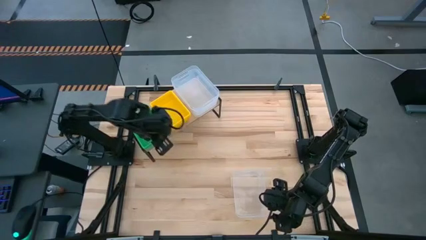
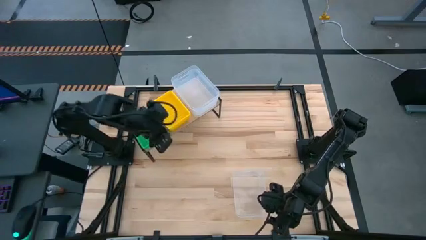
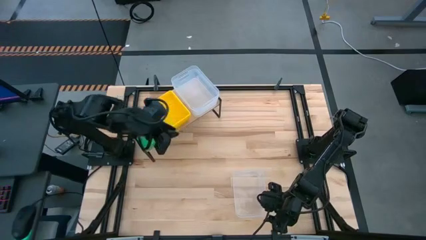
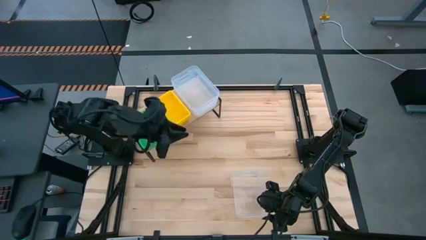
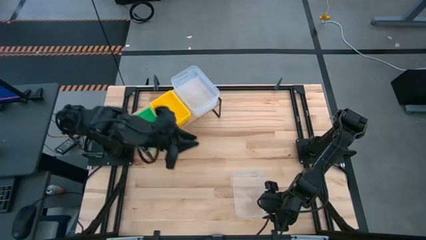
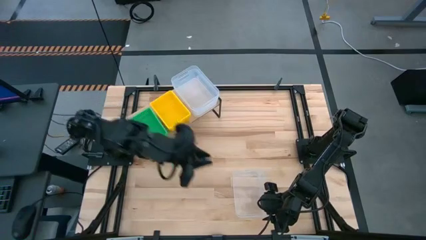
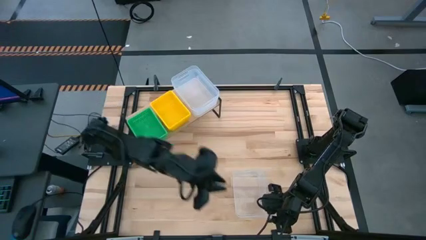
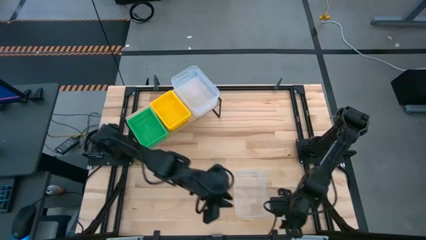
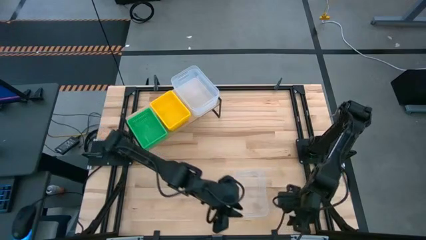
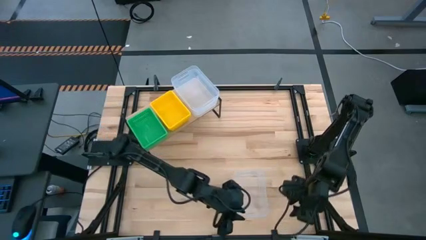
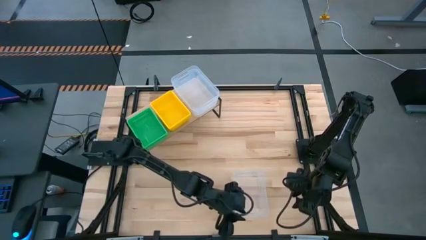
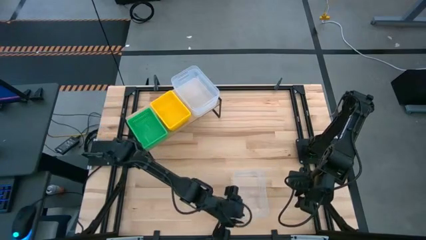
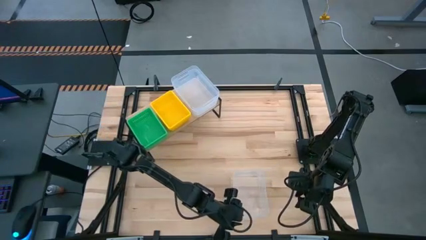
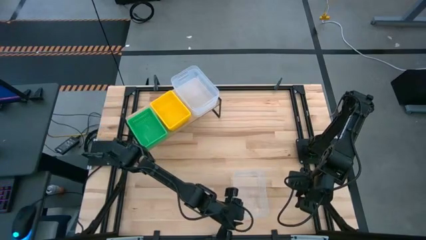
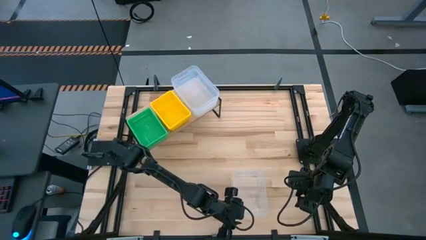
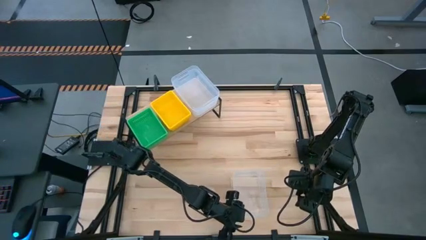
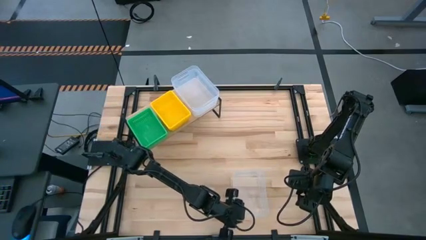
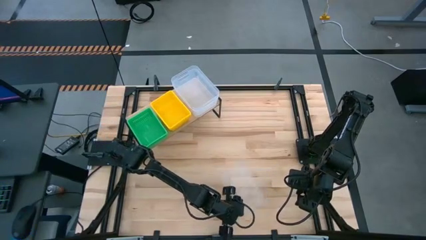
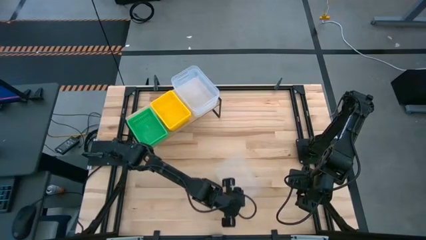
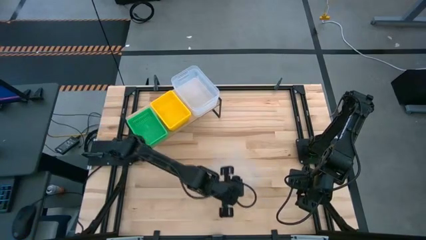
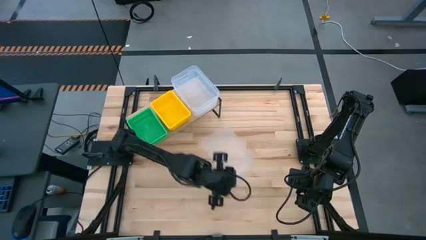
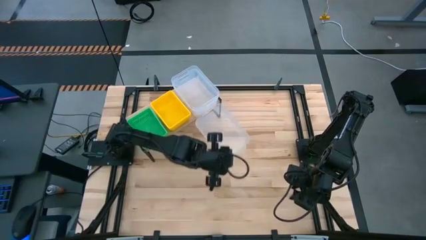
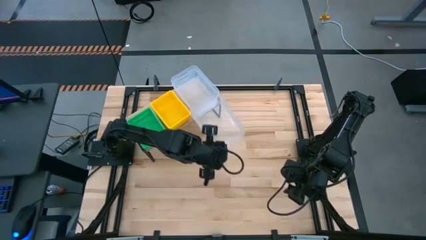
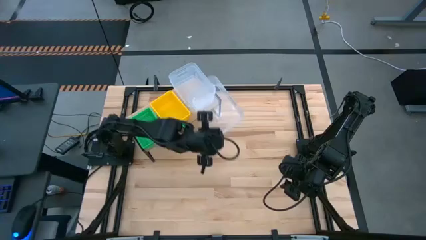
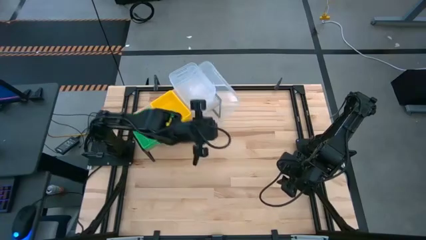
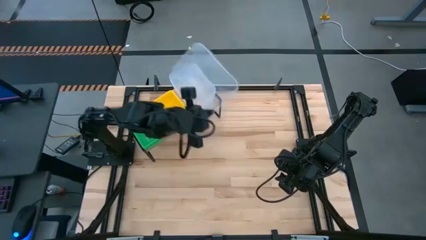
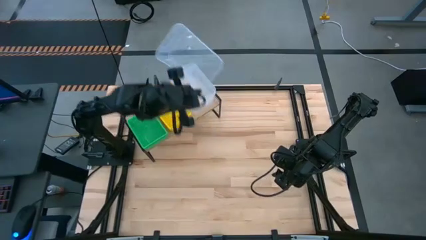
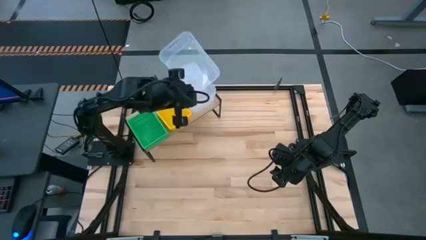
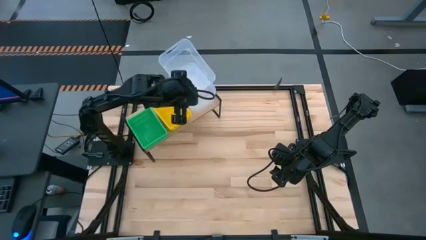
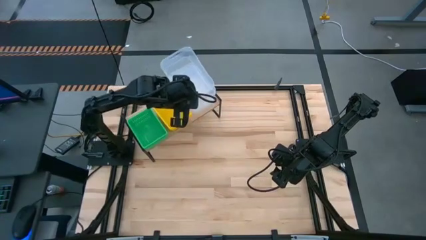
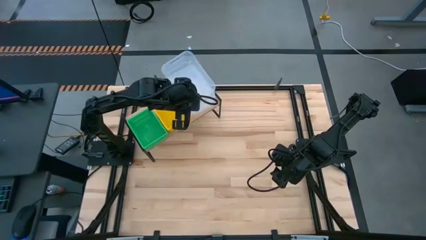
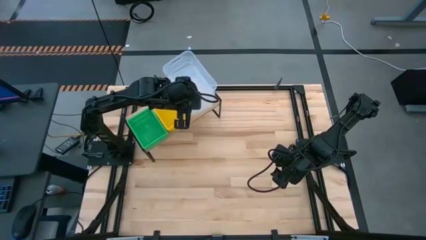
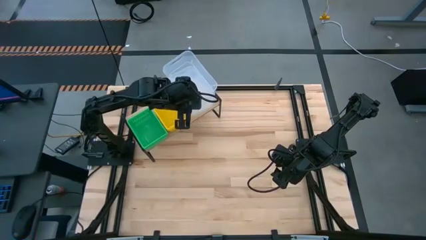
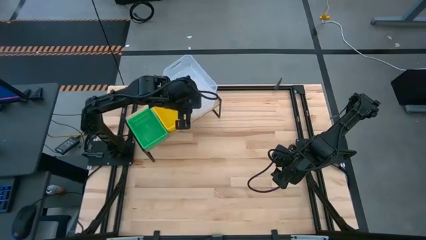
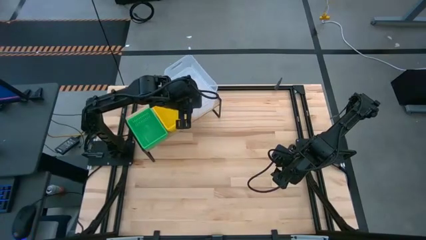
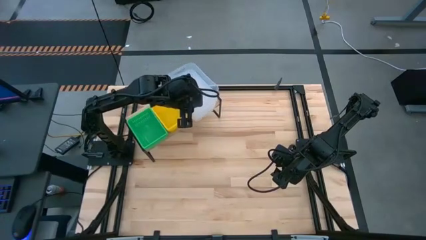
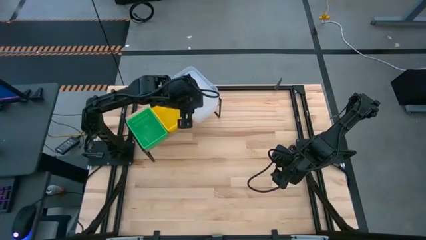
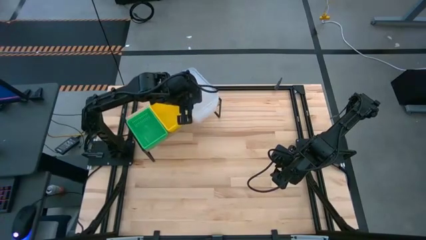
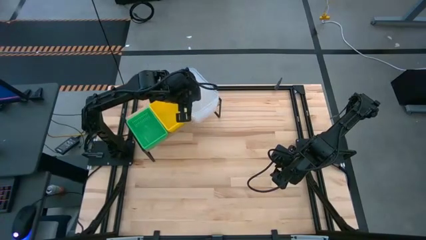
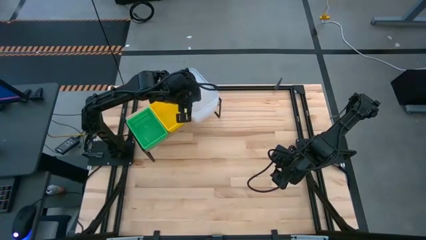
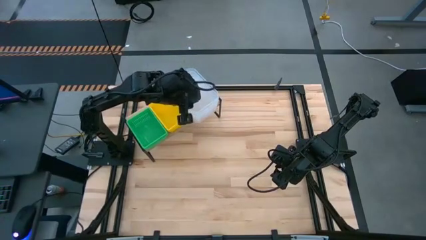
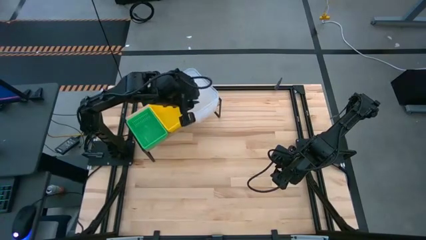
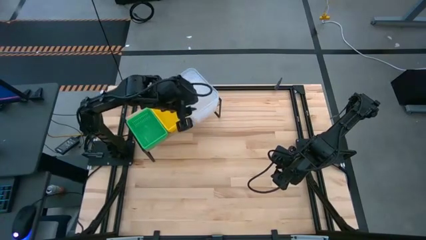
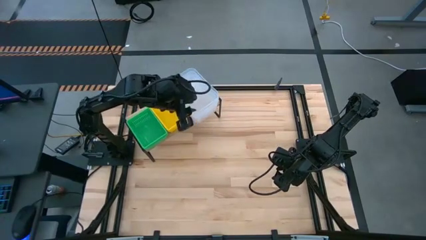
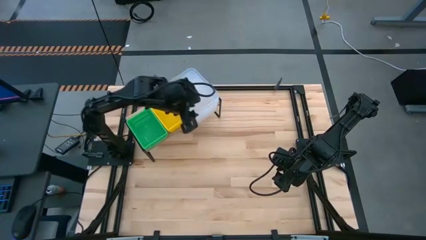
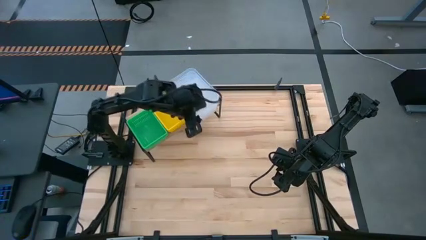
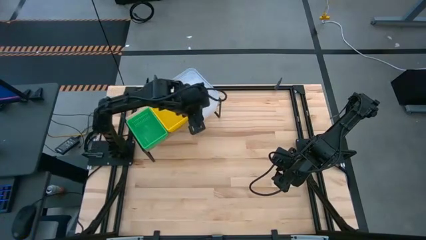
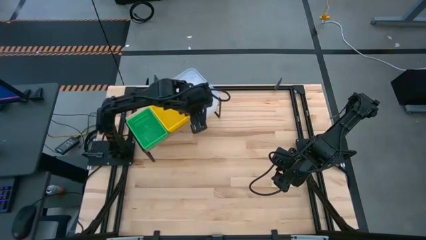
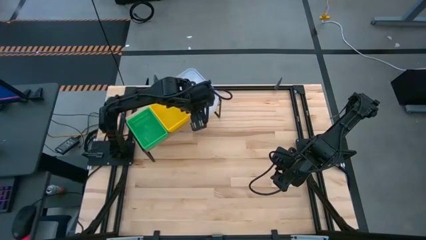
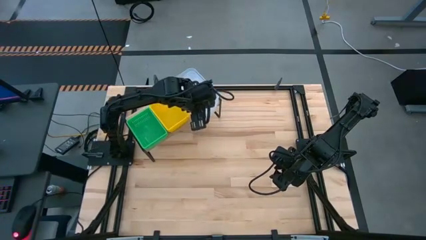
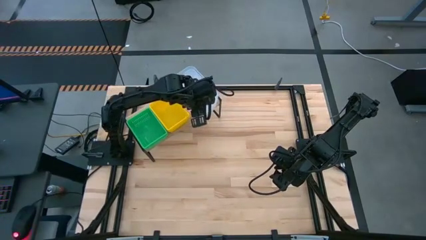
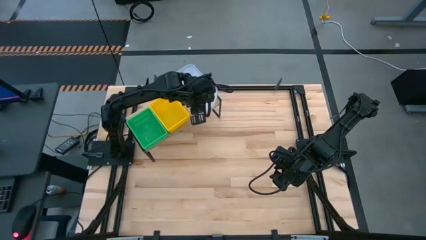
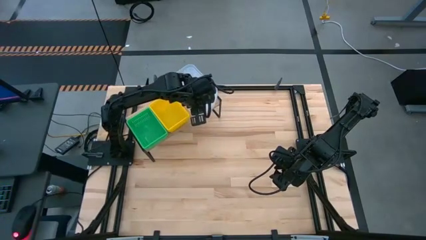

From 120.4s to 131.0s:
Task: Stack baskets on shelf by color
Stack the transparent bin on top of the other transparent bin on the shelf

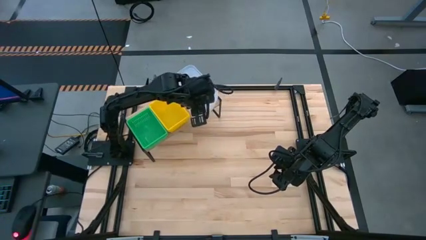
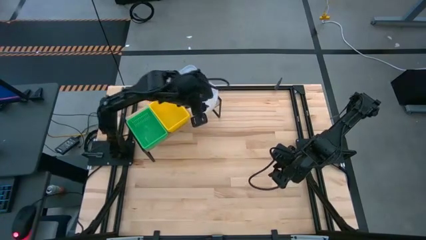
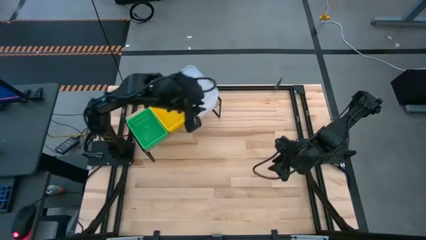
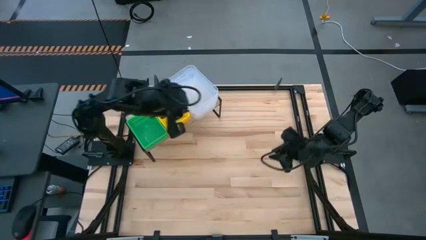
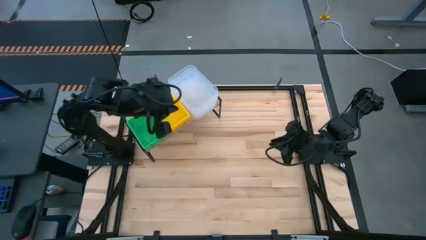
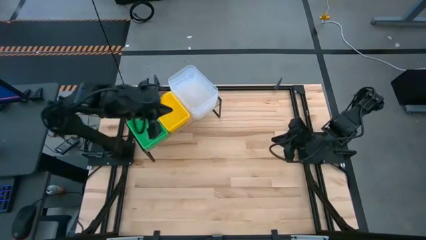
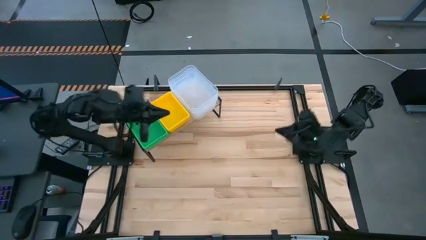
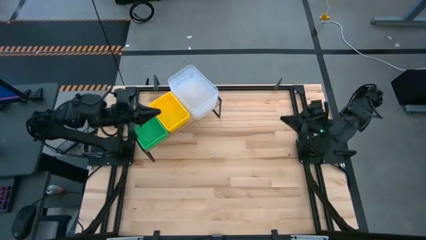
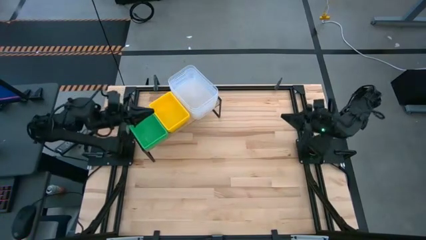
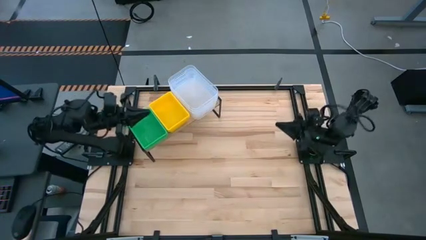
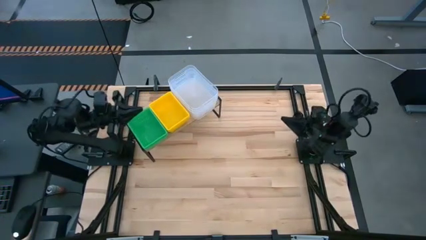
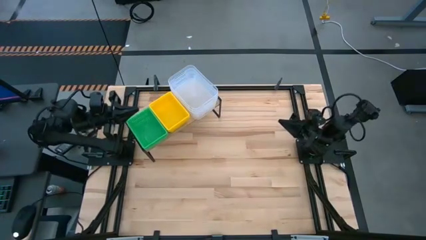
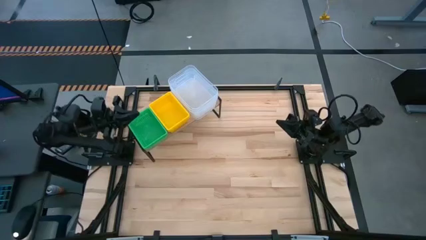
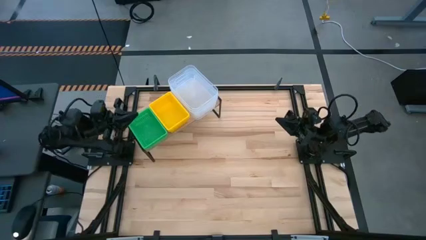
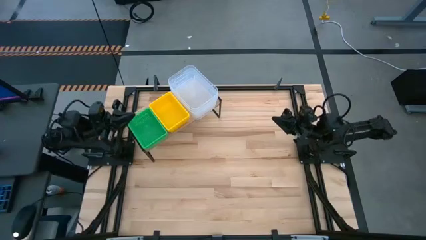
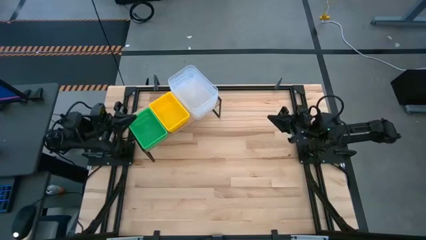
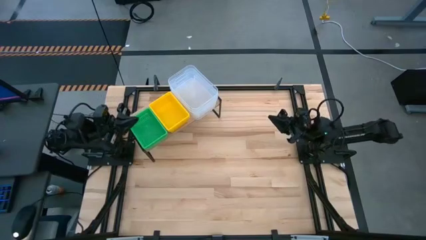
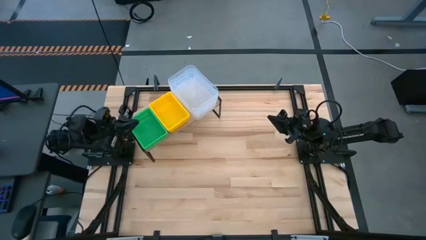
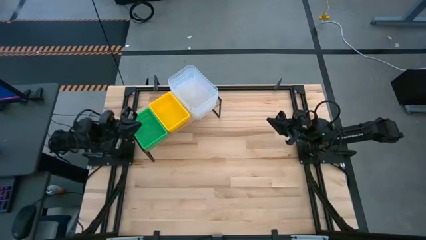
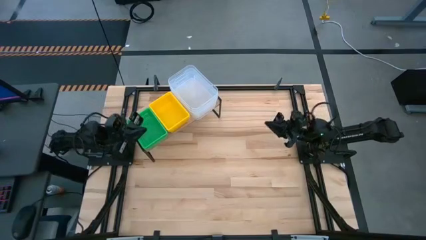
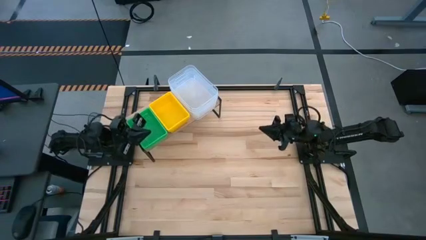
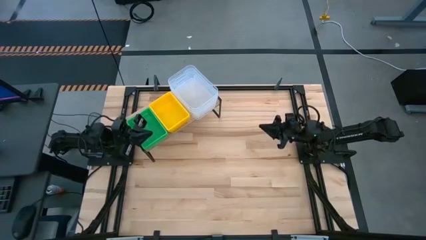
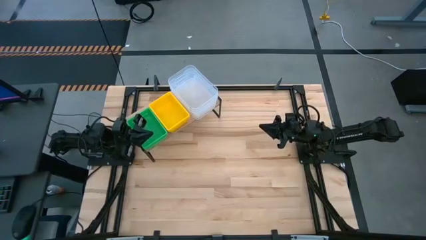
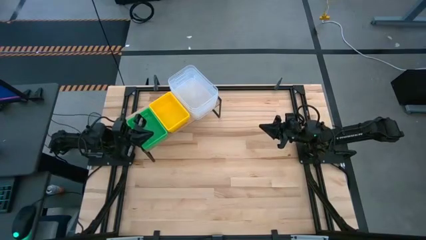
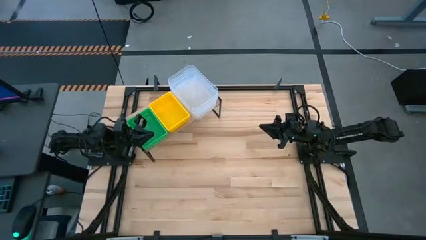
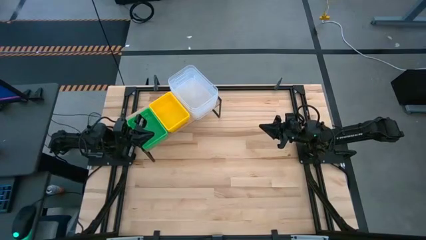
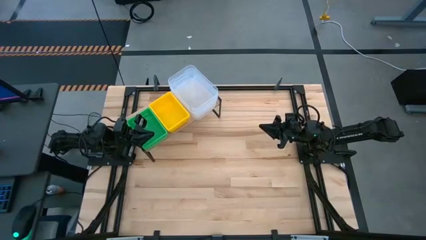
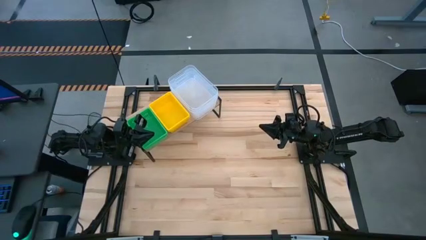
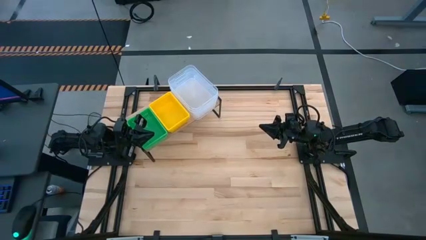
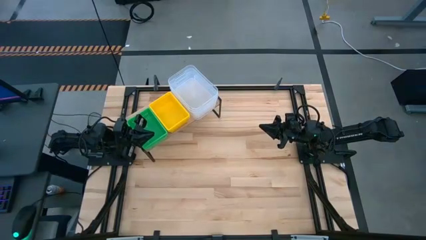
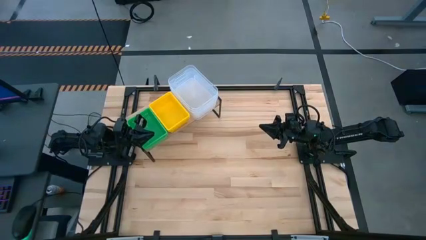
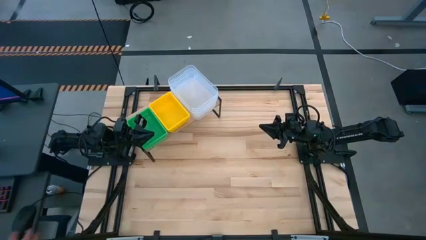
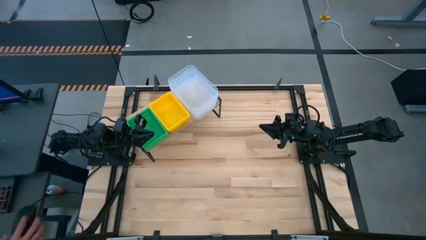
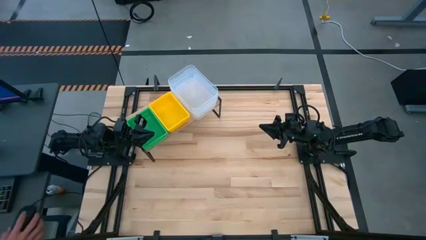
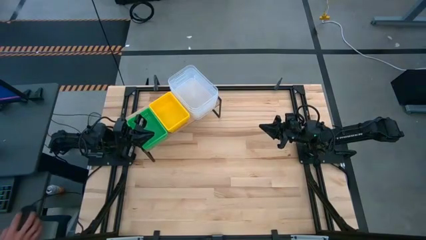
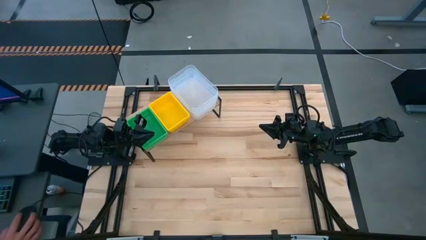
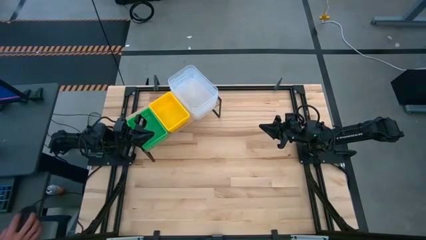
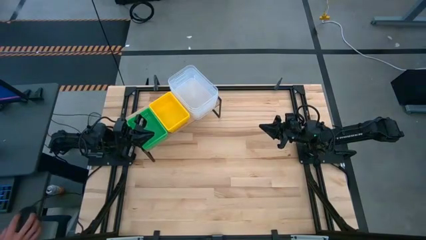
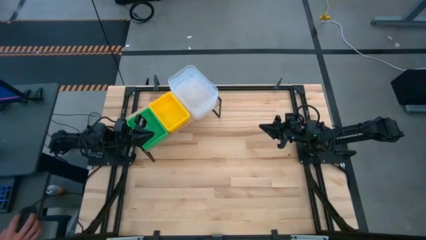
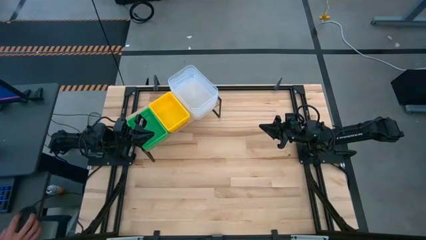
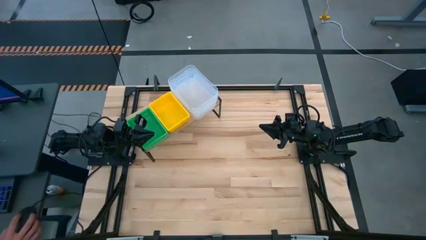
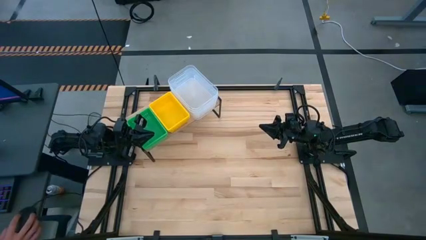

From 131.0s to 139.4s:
Return to Home Position
